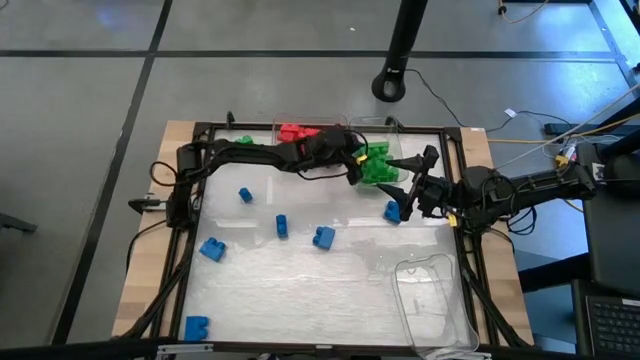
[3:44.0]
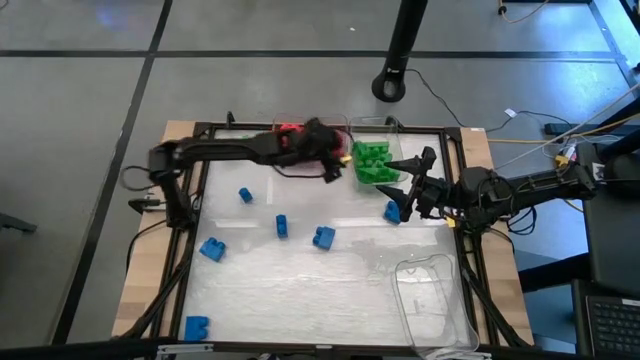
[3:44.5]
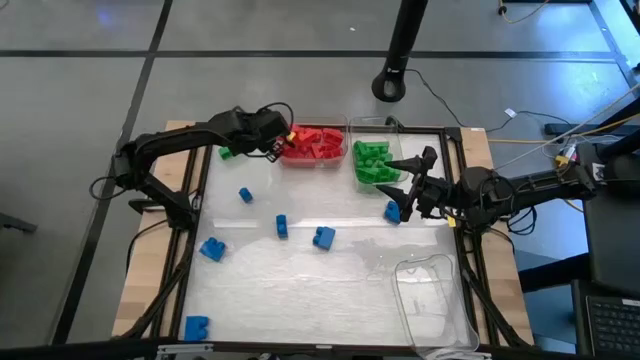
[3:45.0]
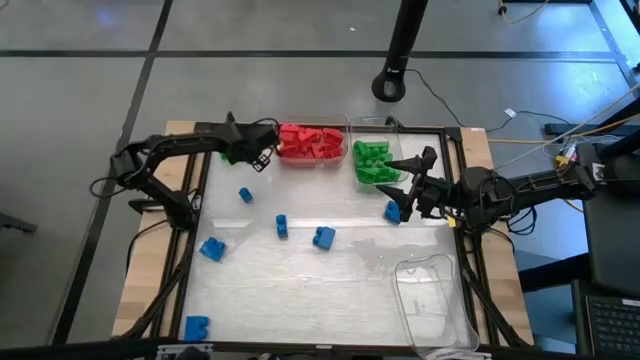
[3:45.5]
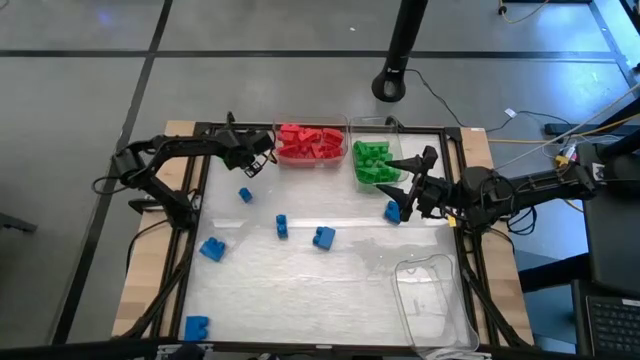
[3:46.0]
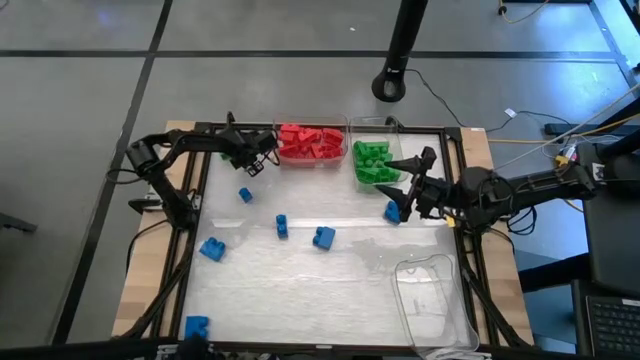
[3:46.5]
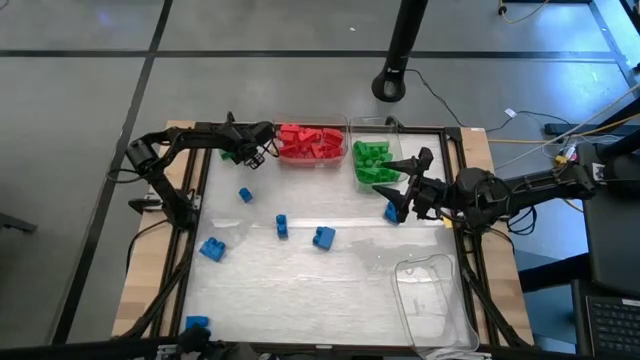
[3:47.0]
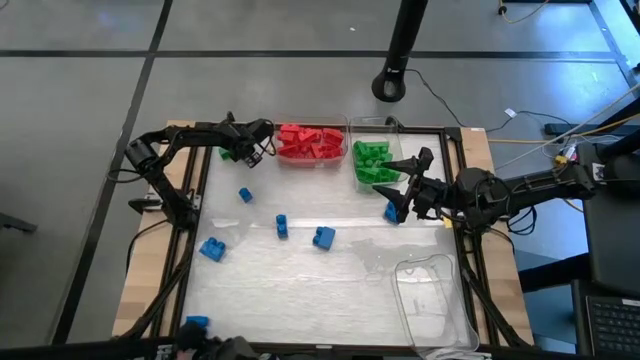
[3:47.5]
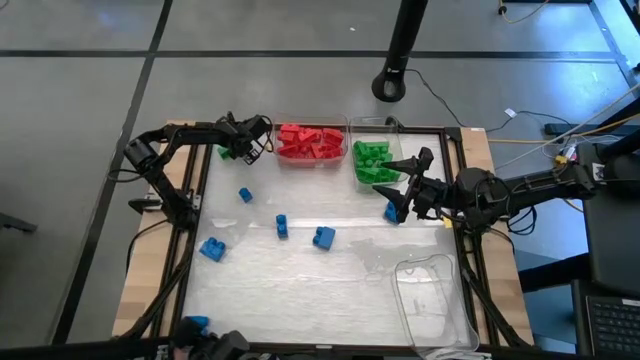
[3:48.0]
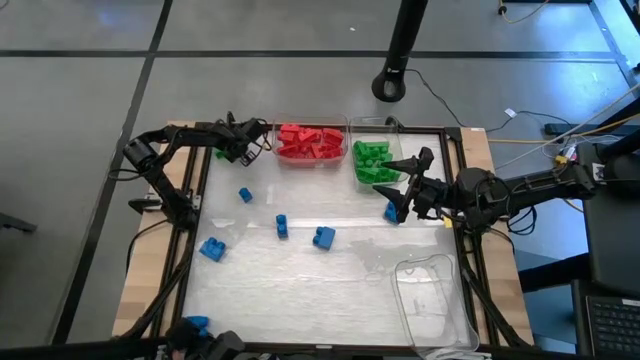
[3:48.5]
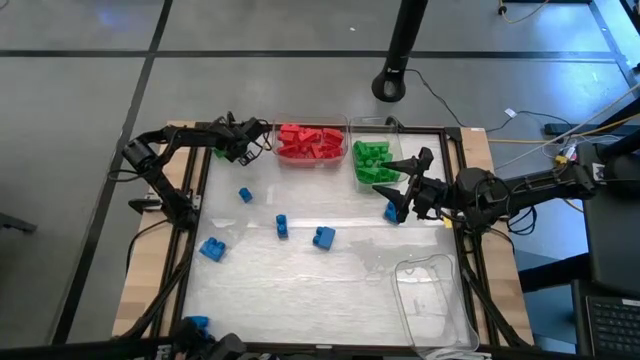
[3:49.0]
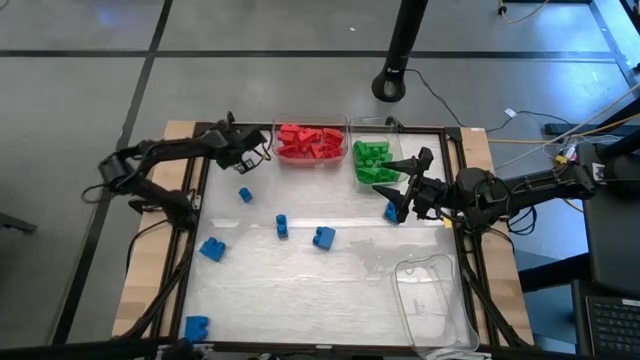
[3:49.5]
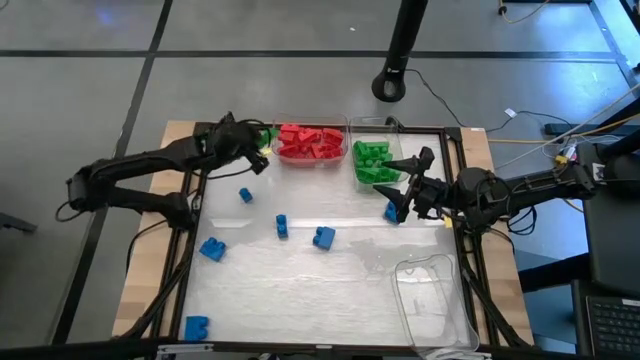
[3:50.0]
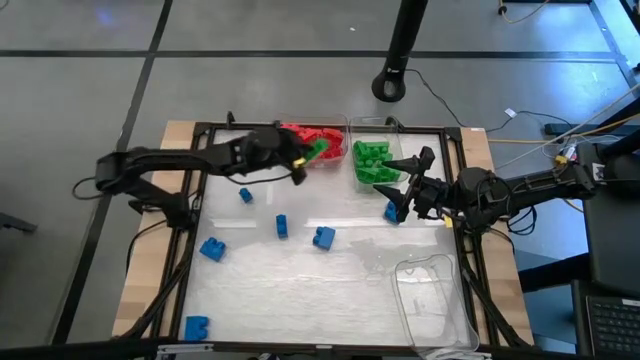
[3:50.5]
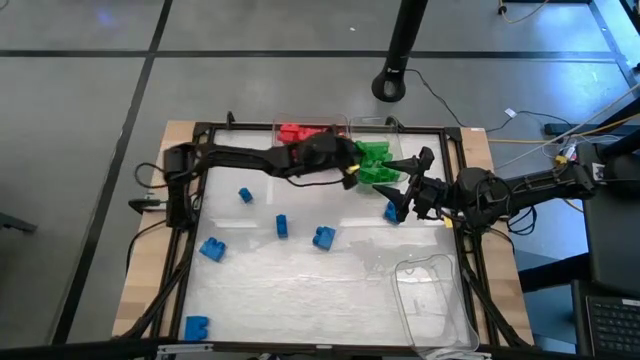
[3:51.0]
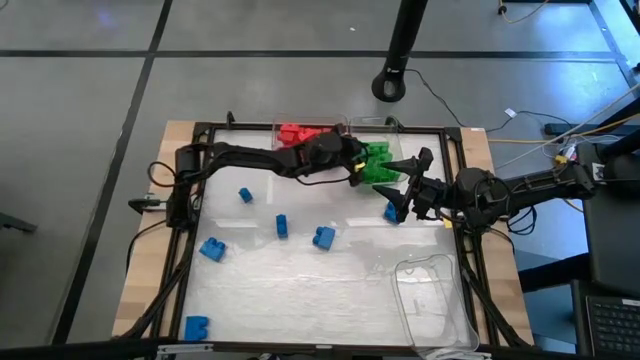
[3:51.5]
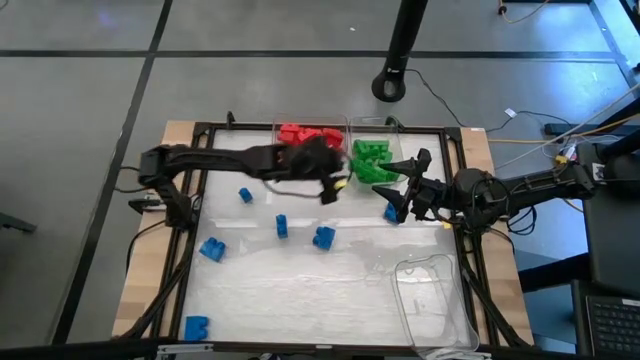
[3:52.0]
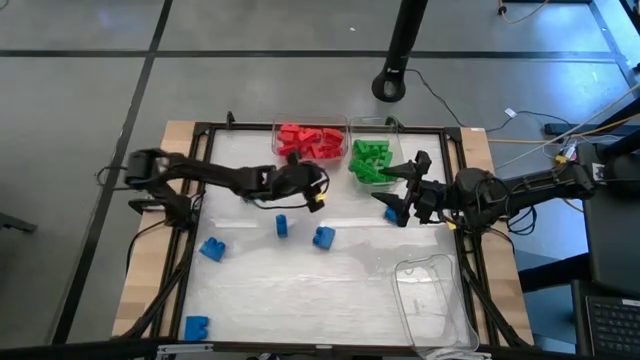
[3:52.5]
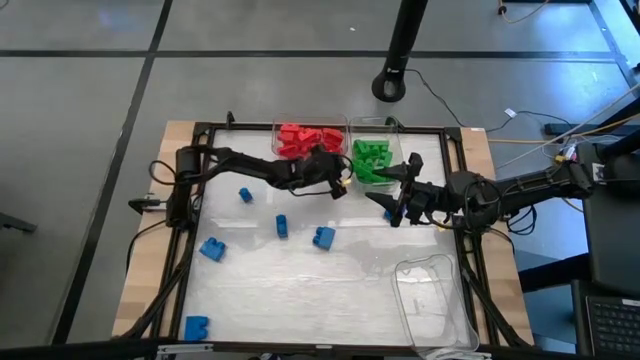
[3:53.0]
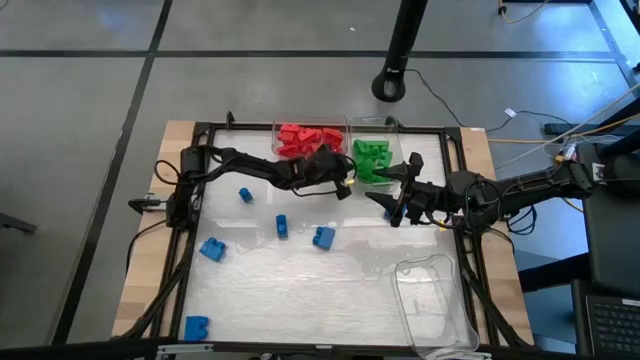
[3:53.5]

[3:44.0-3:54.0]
Task: Sort blocks
Put the green game piece into the top right transparent bin

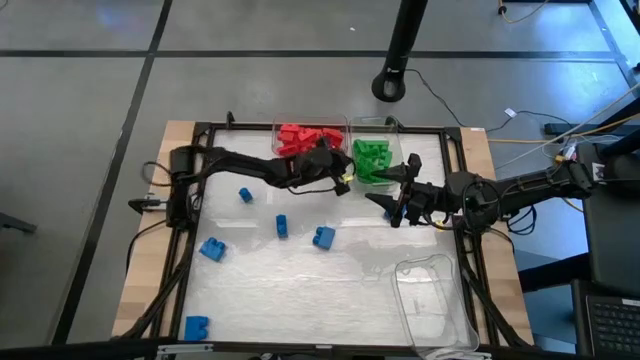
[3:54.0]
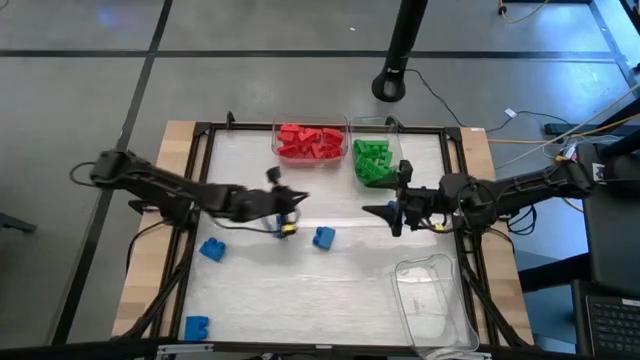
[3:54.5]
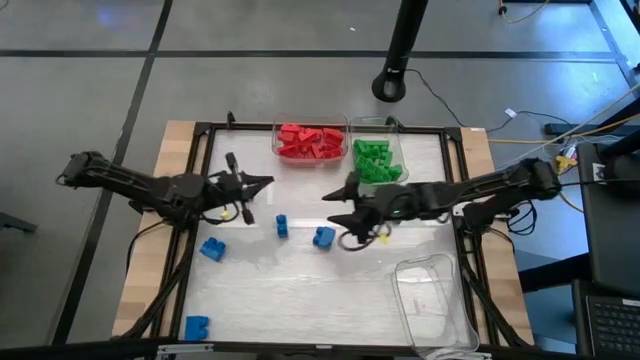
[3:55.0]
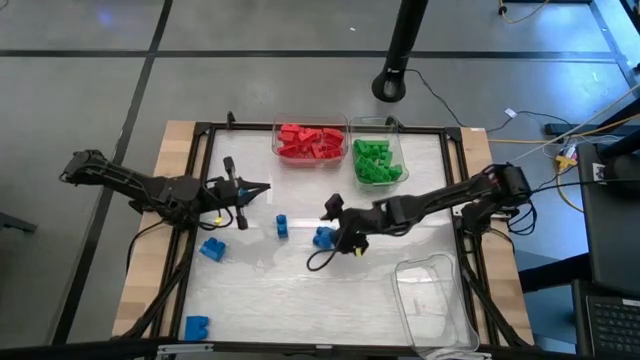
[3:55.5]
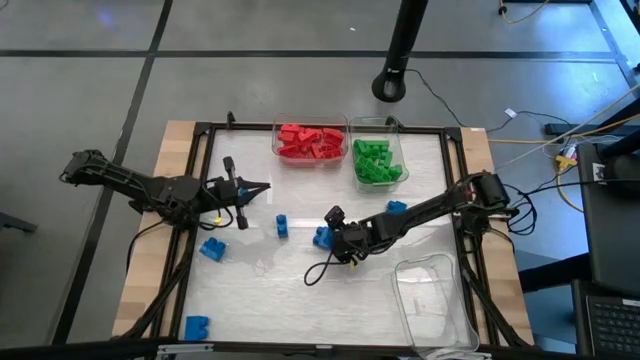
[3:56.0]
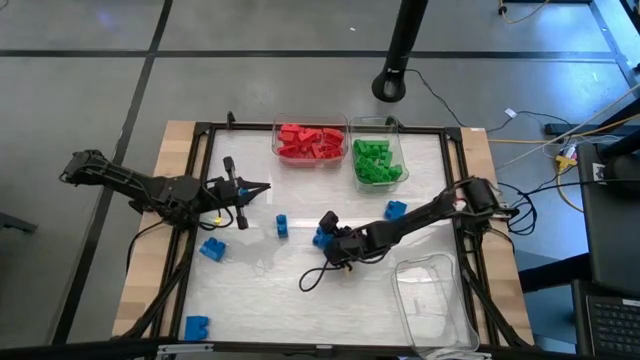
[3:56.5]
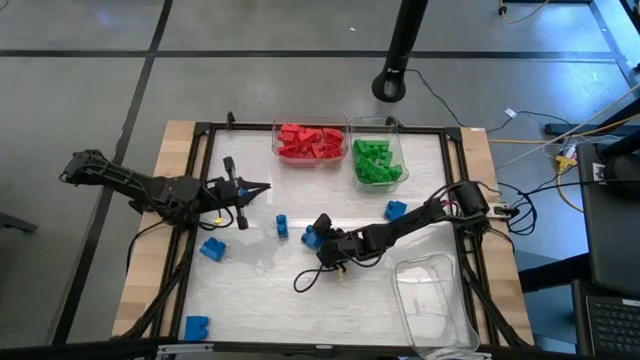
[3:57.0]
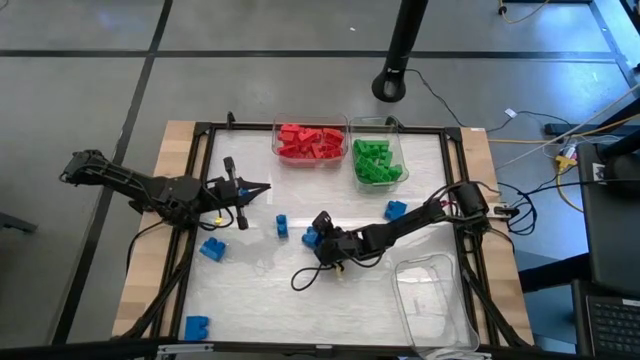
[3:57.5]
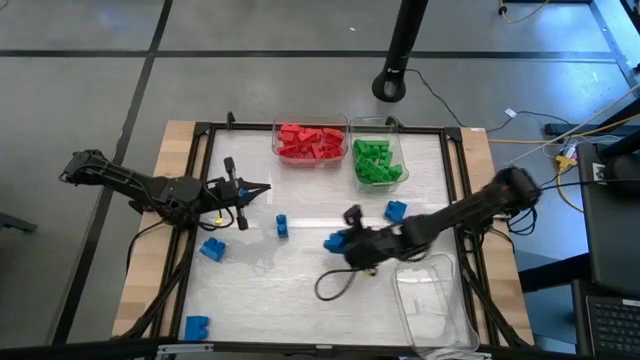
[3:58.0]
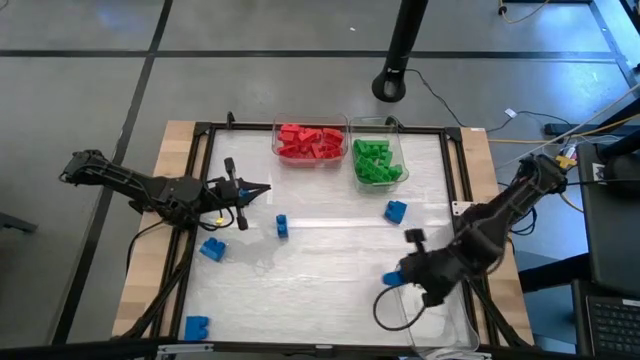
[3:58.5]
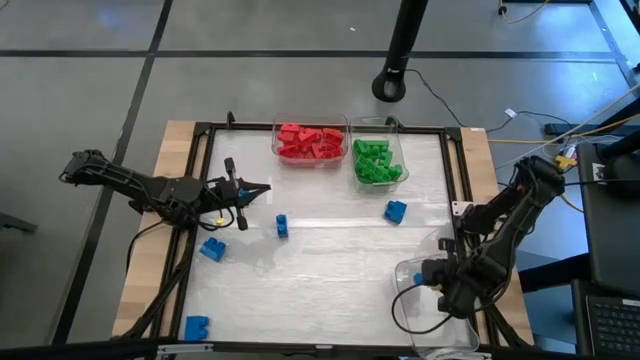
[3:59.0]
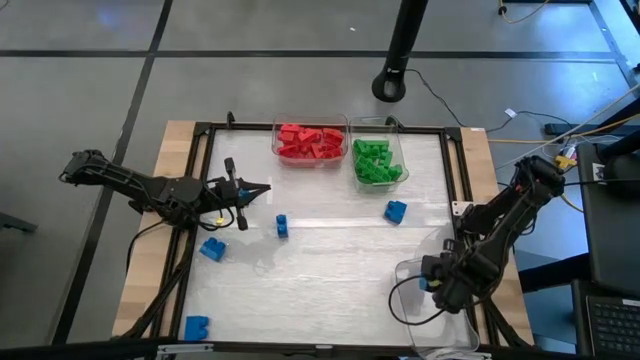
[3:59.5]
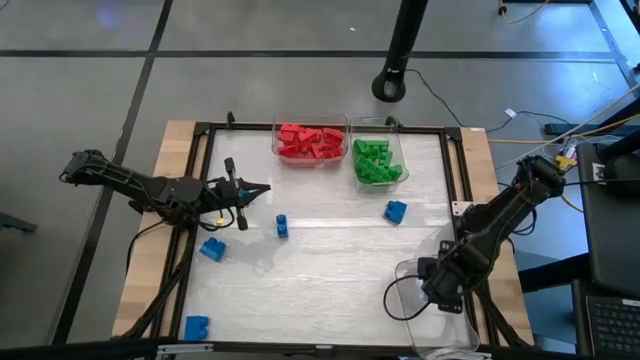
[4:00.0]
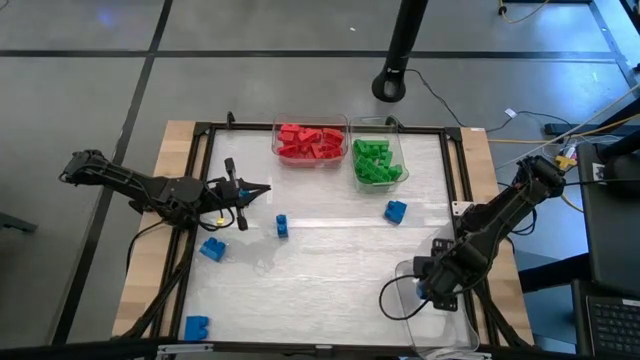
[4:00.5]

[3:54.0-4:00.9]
Put the blue game piece into the bottom transparent bin

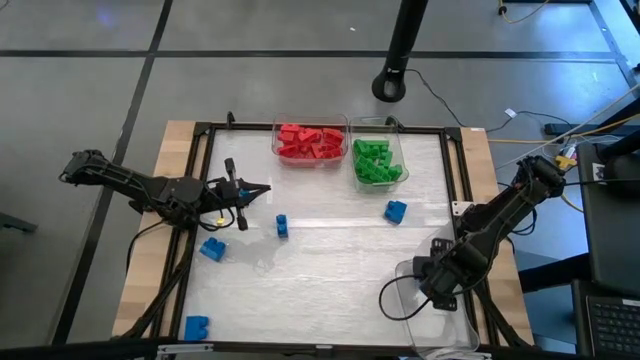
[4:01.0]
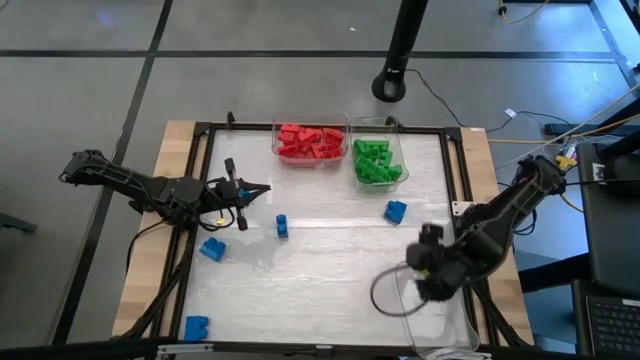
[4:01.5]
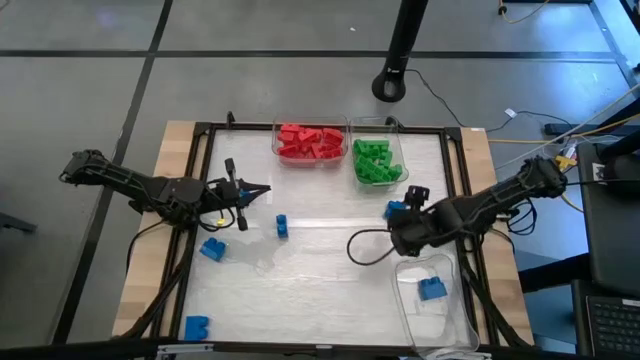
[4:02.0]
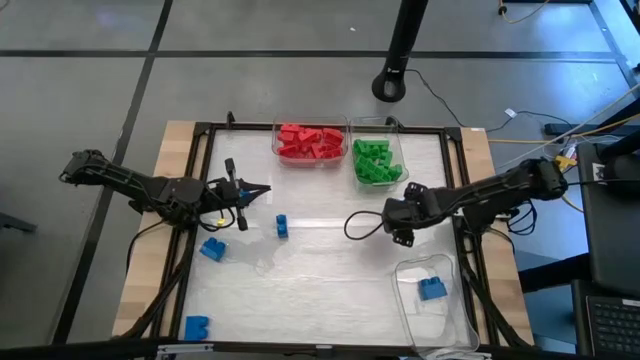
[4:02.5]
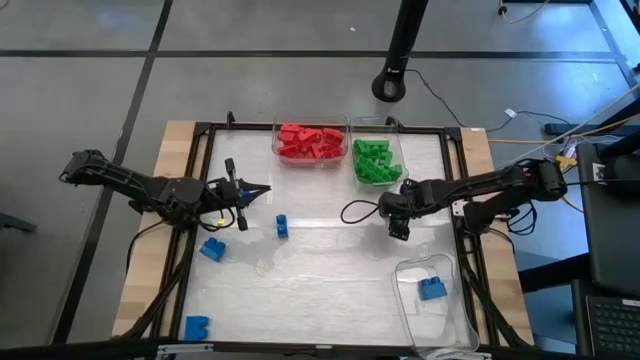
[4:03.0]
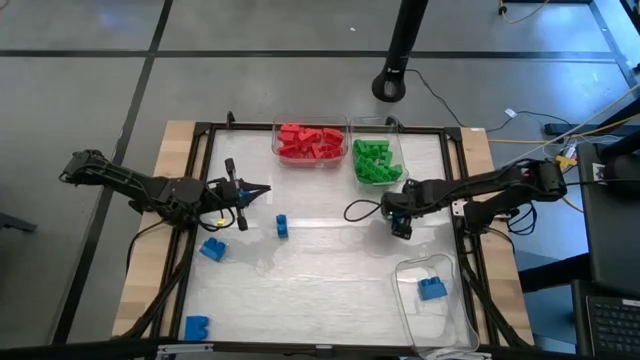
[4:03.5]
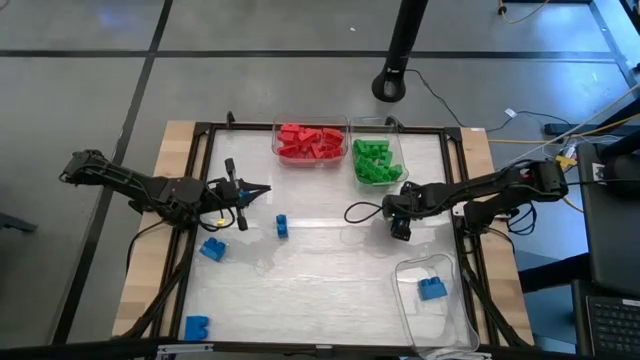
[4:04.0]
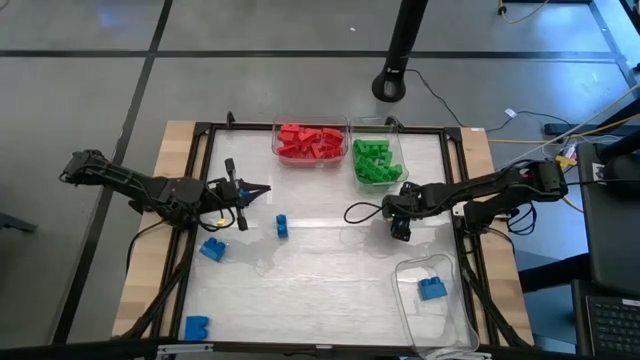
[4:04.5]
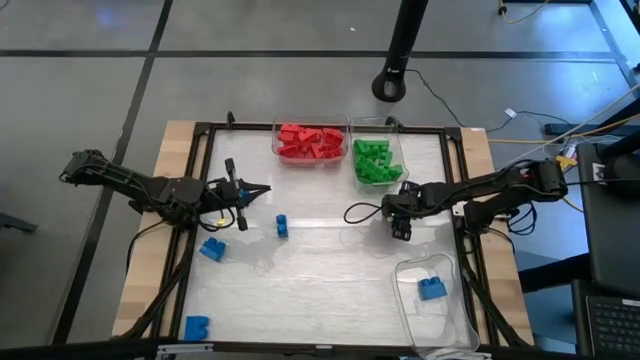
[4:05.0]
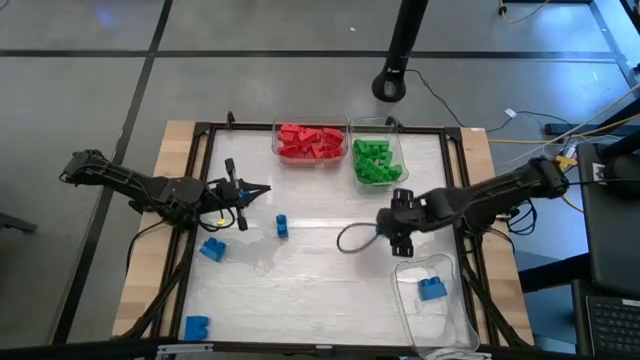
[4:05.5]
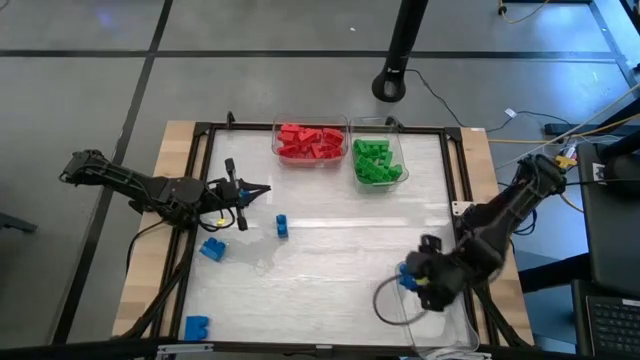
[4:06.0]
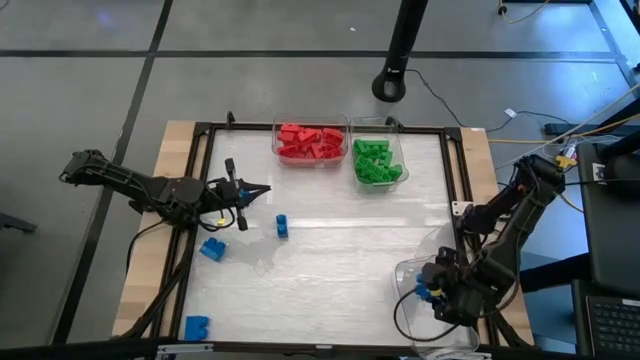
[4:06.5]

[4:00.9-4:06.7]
Put the blue game piece into the bottom transparent bin
